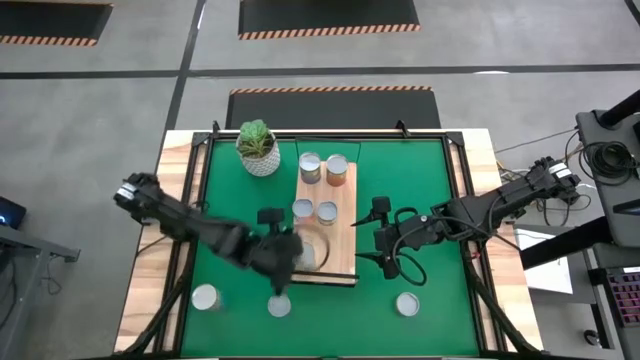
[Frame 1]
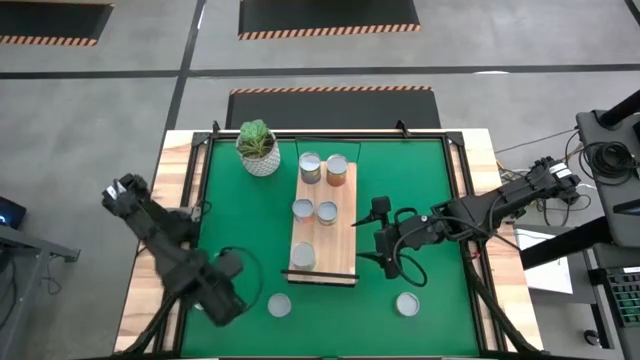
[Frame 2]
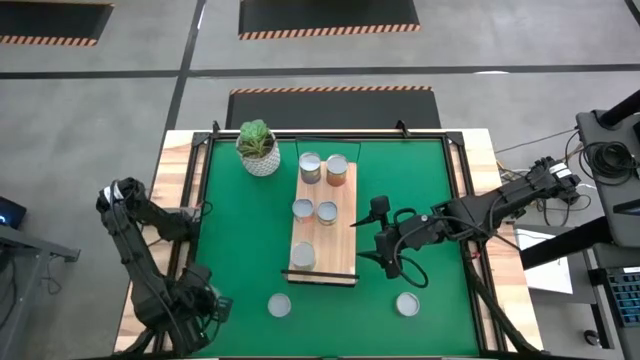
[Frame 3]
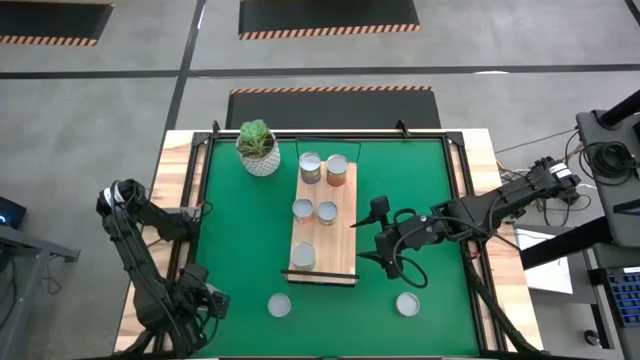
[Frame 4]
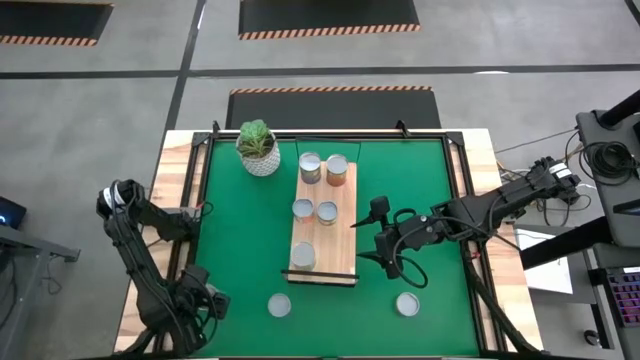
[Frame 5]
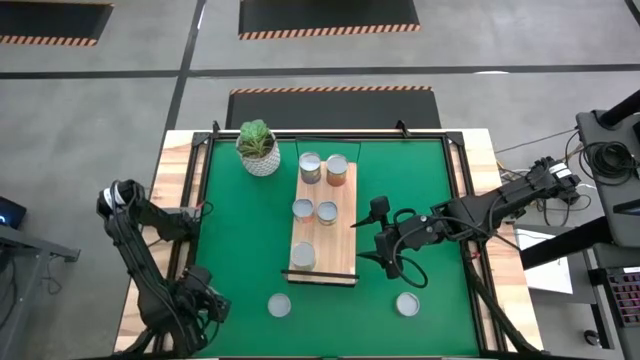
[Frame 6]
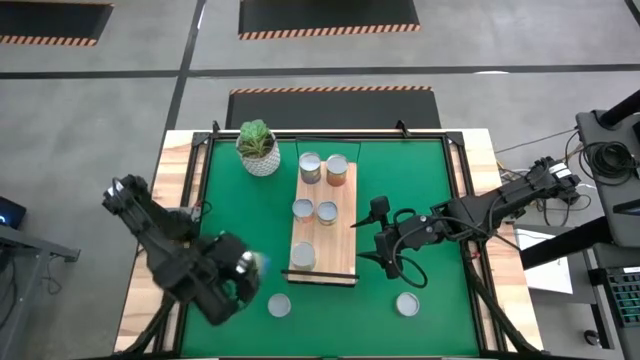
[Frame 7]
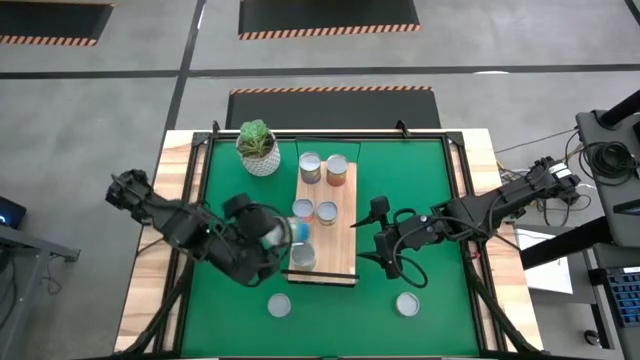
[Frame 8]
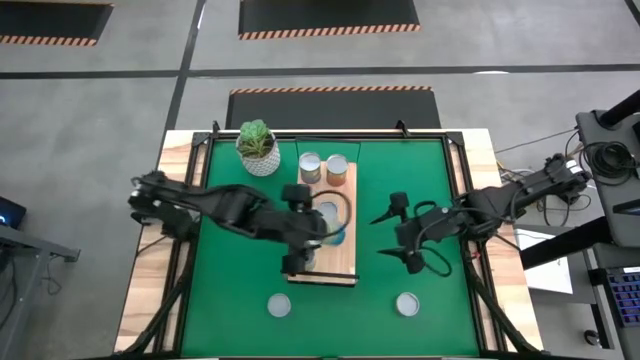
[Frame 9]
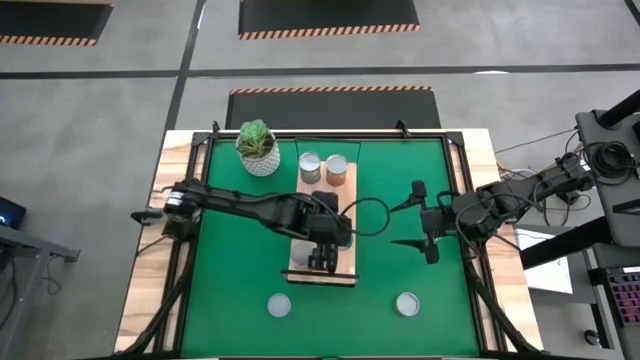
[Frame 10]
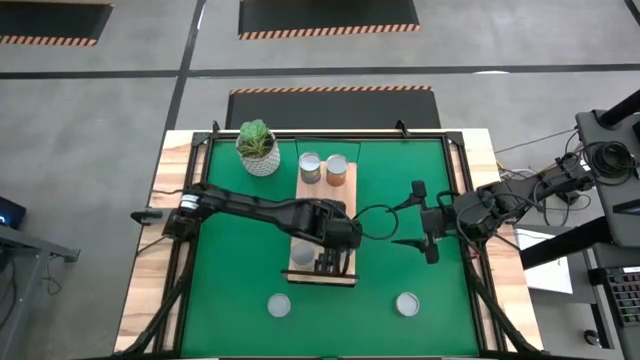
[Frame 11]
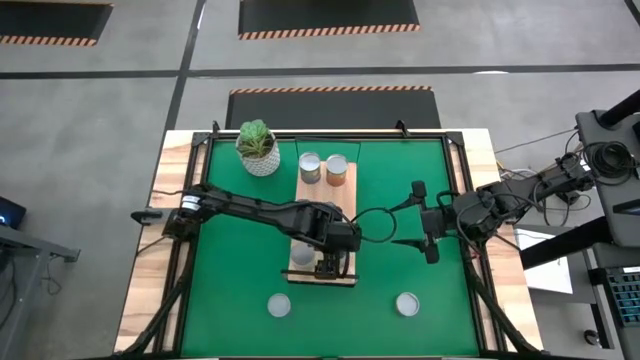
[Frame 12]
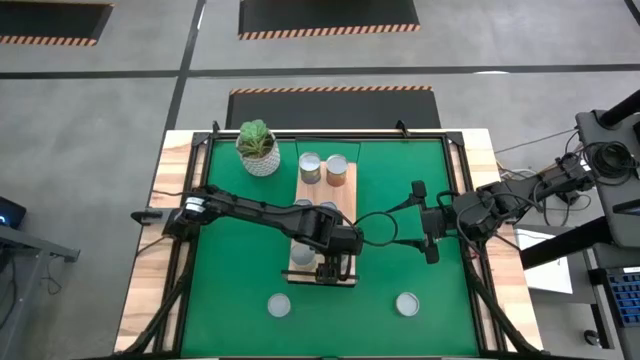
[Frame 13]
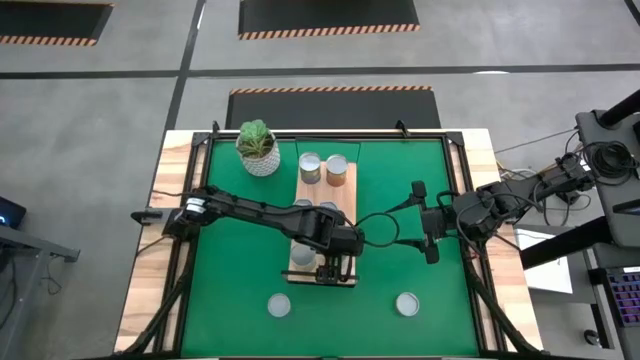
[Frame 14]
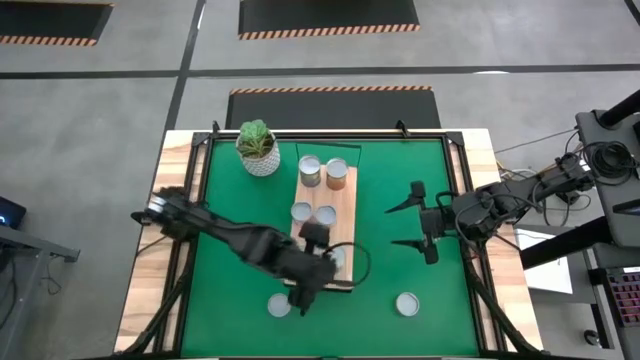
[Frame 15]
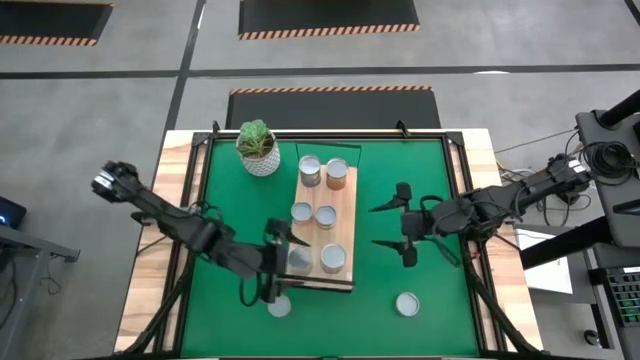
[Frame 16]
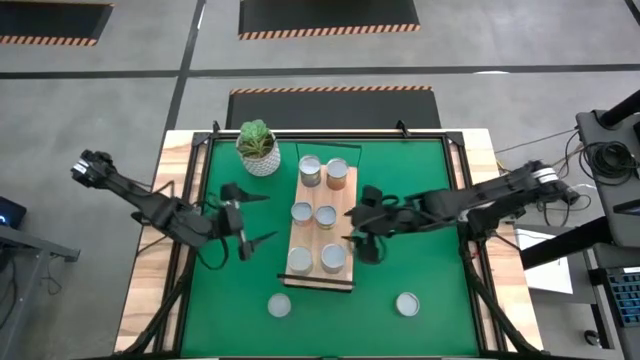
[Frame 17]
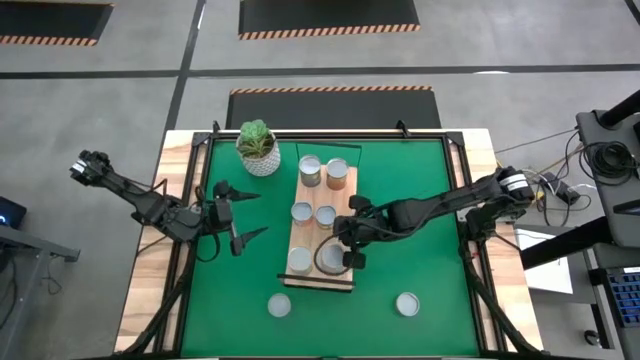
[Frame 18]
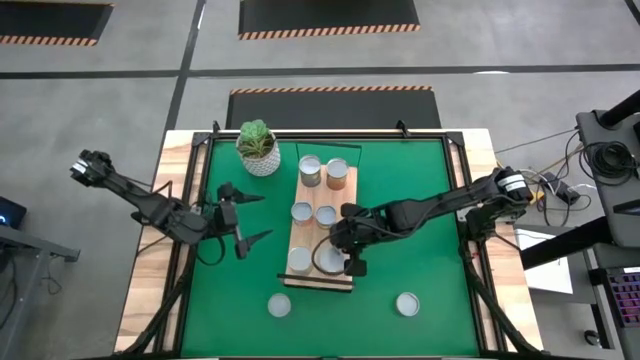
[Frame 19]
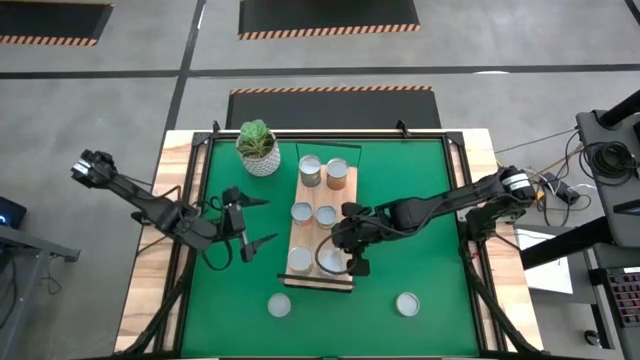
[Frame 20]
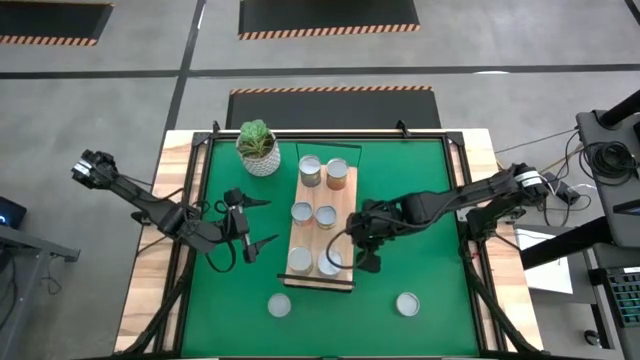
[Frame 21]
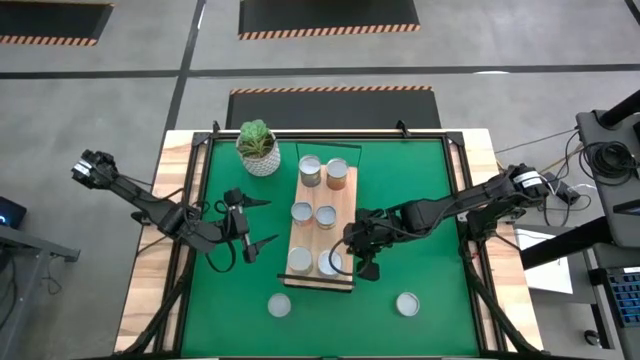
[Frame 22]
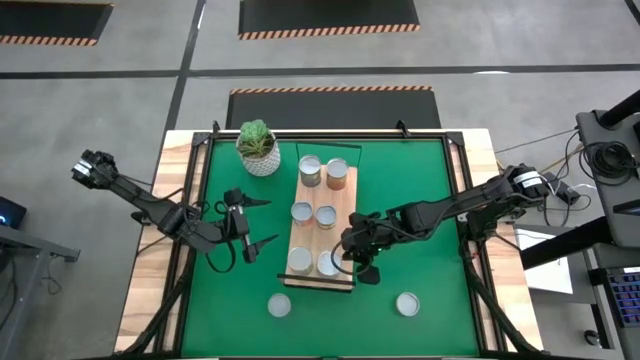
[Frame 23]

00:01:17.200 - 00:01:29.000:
Task: Pick and place cans onto a shelf
Put the canned cherries on the shelf

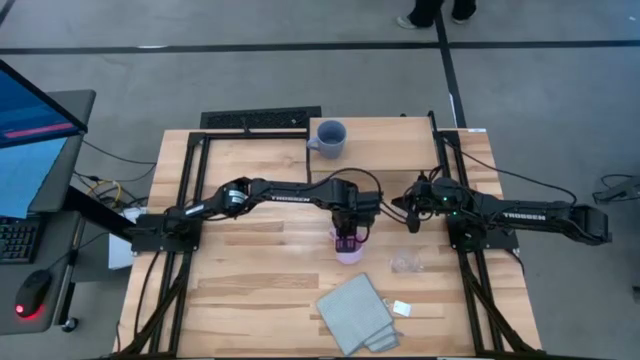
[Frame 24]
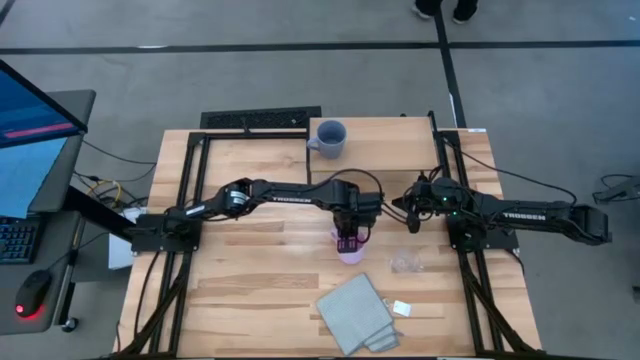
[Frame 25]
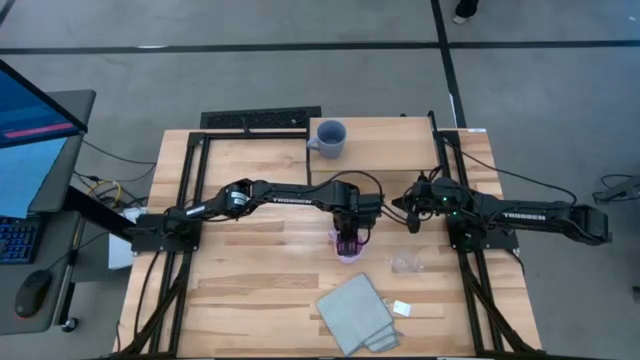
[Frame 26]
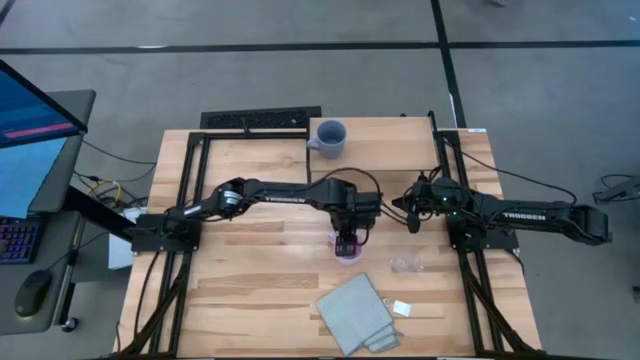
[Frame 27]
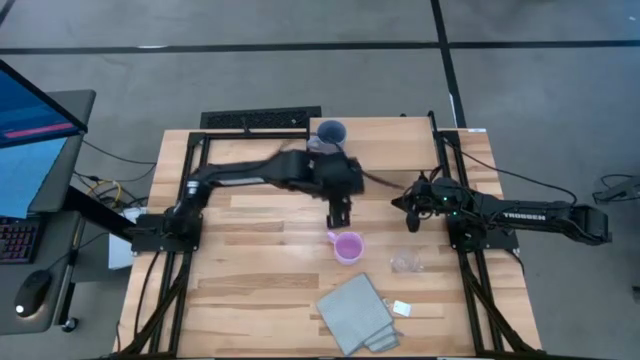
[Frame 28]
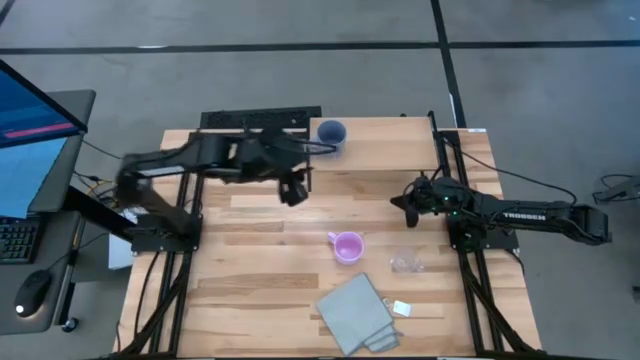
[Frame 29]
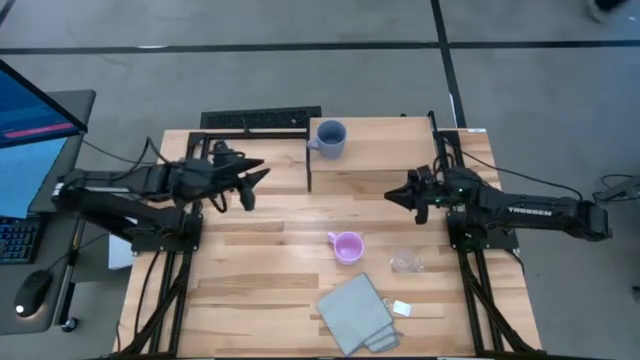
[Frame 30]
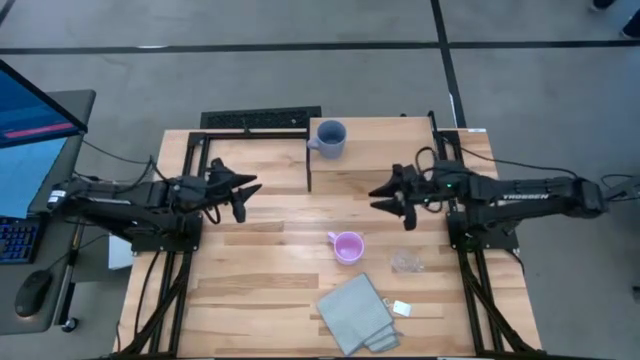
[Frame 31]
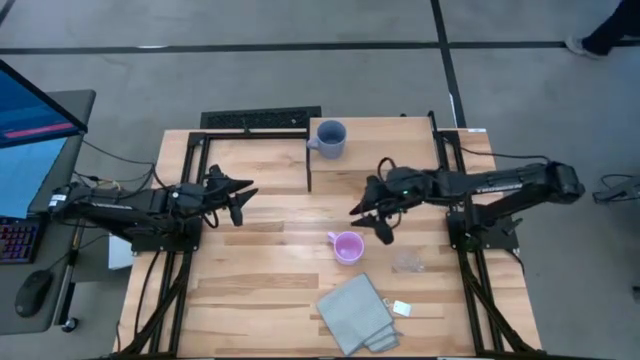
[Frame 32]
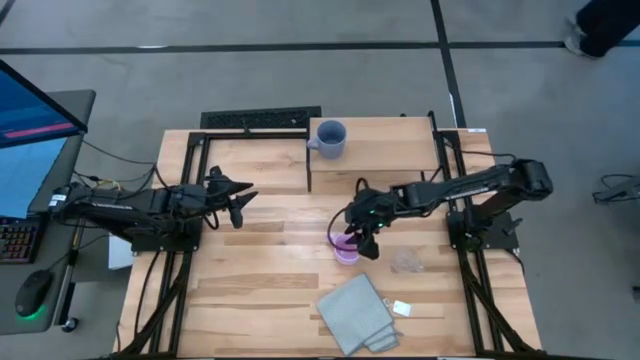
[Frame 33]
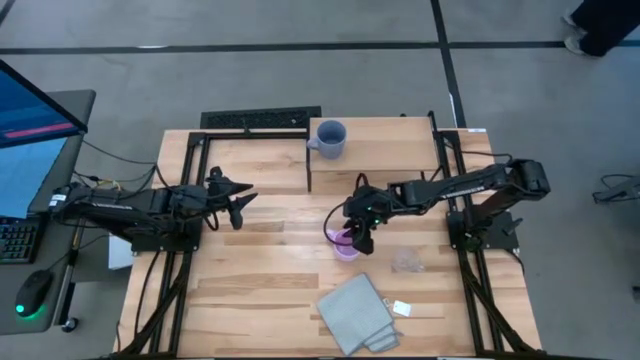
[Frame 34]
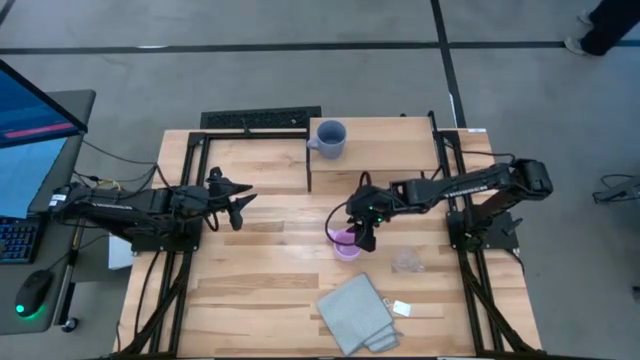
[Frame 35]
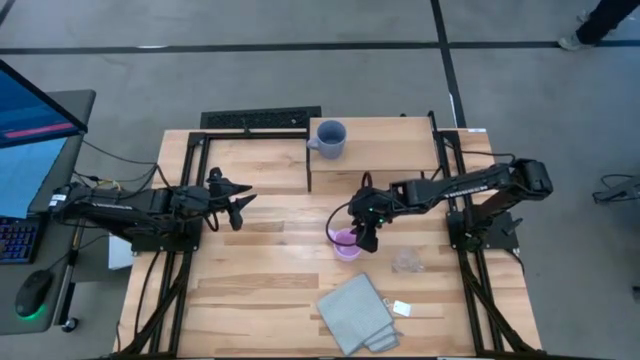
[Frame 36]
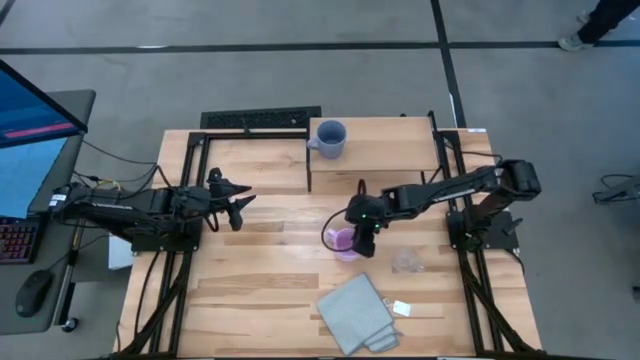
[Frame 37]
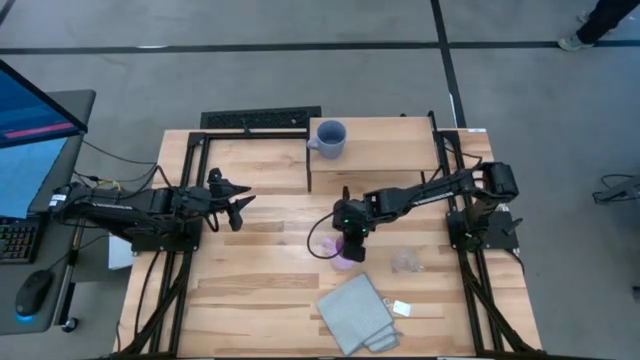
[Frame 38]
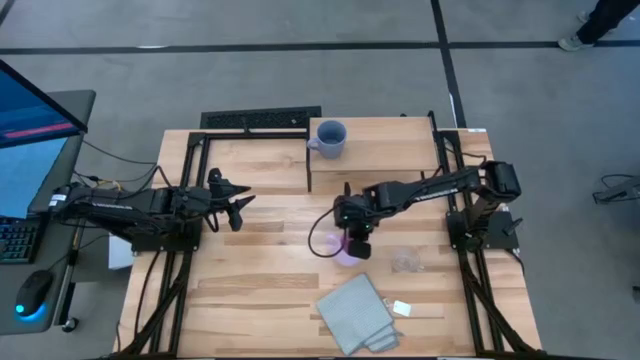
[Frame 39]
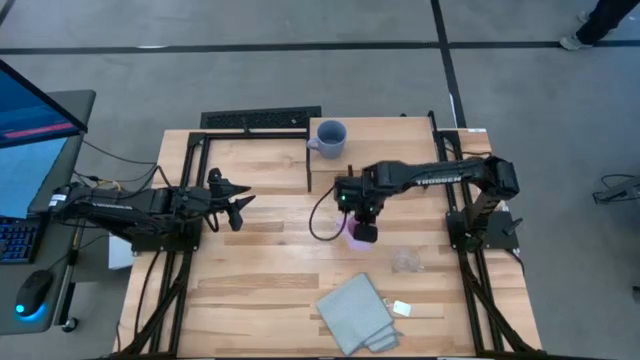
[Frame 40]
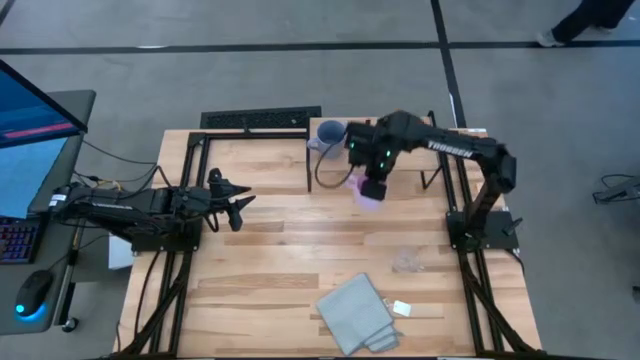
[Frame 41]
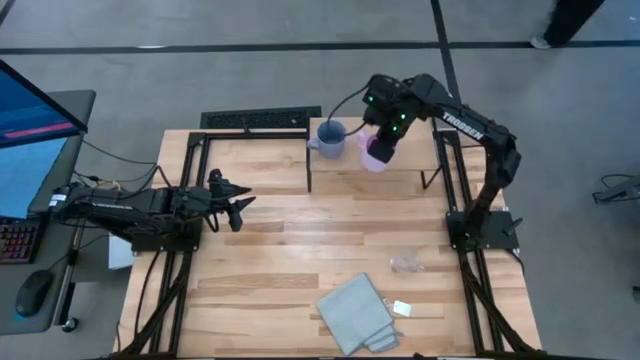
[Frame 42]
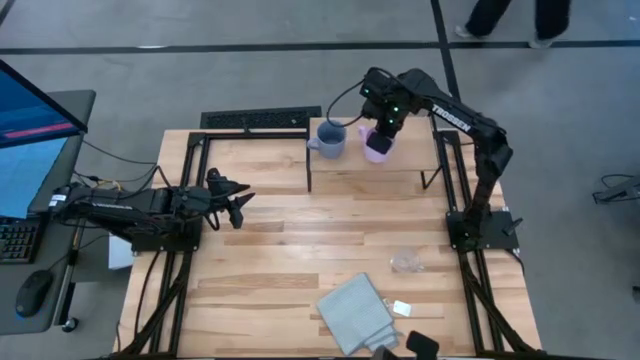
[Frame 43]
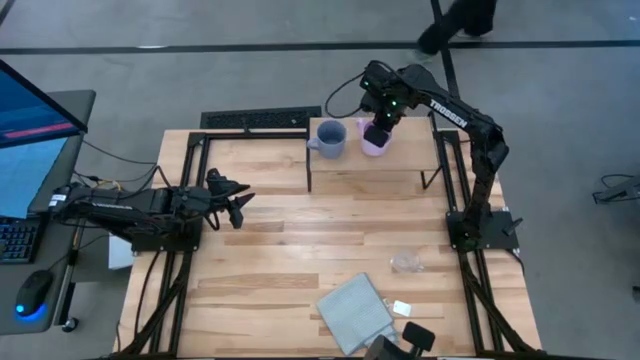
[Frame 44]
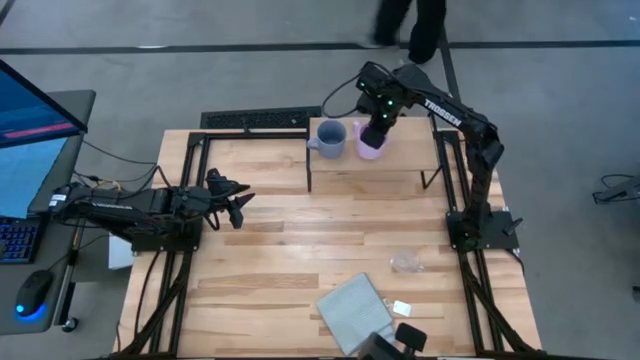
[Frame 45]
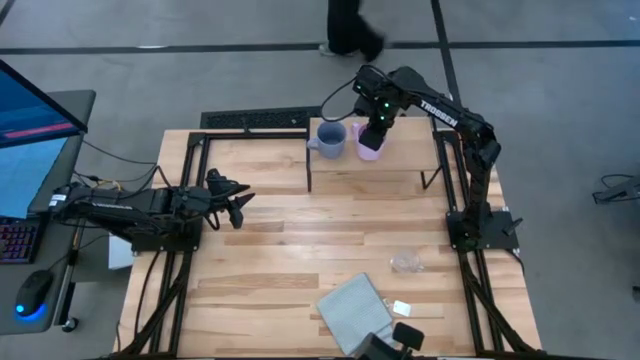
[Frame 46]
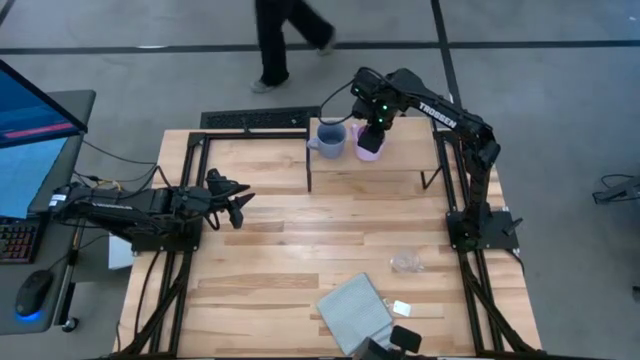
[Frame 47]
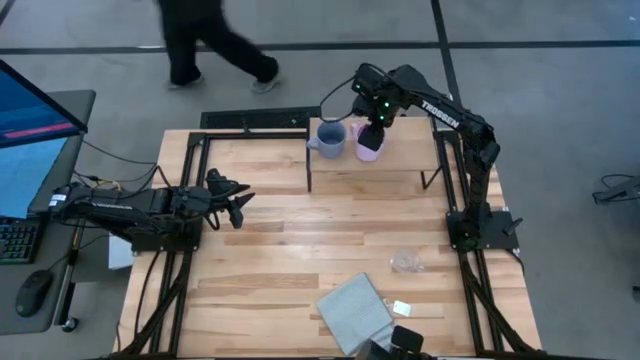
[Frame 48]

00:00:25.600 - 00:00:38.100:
Task: Stack small to large cups/mugs on shelf
Put the pink mug on the shelf
